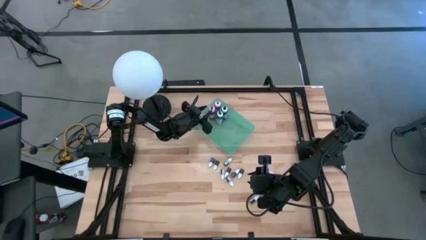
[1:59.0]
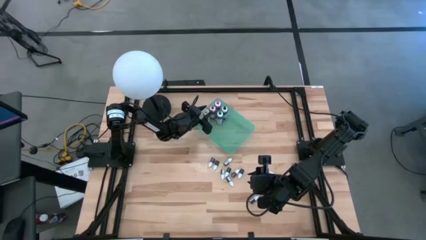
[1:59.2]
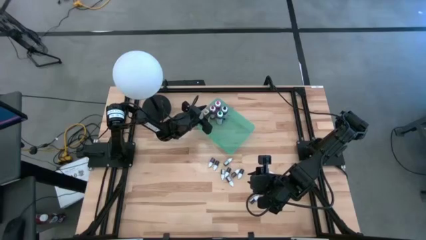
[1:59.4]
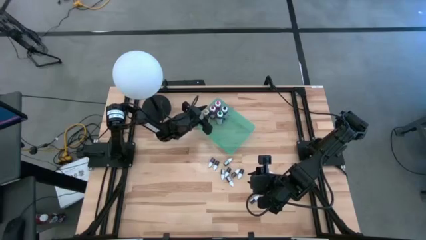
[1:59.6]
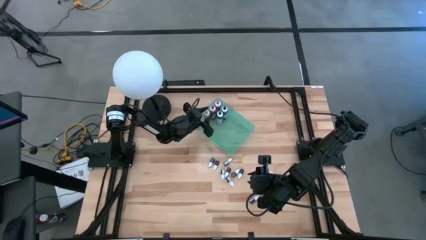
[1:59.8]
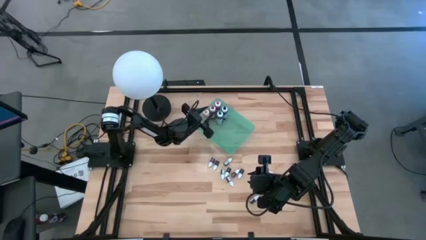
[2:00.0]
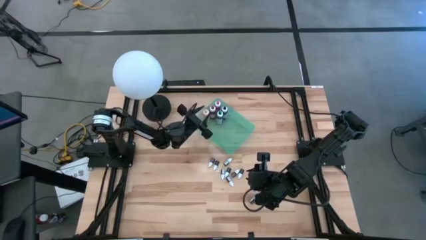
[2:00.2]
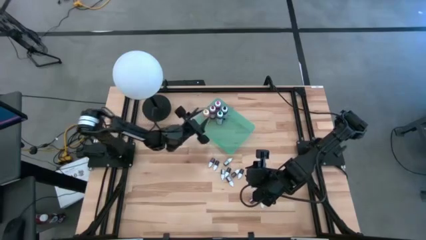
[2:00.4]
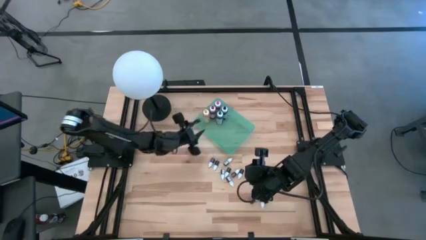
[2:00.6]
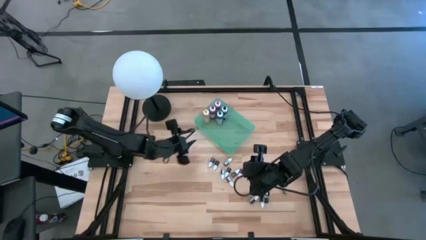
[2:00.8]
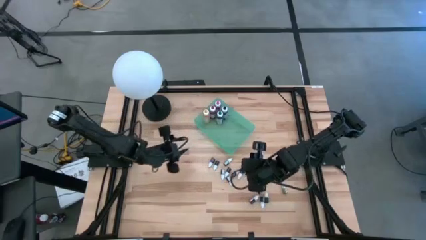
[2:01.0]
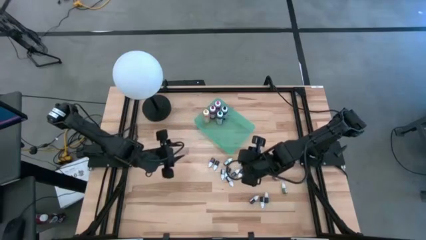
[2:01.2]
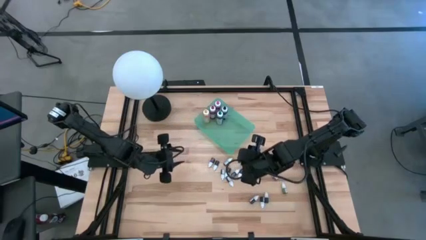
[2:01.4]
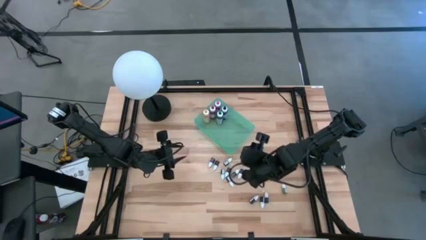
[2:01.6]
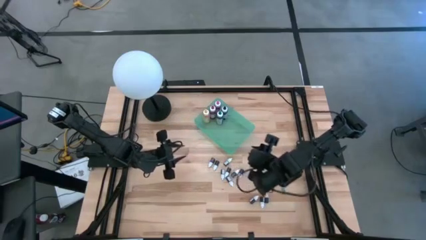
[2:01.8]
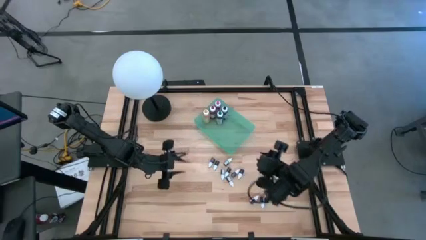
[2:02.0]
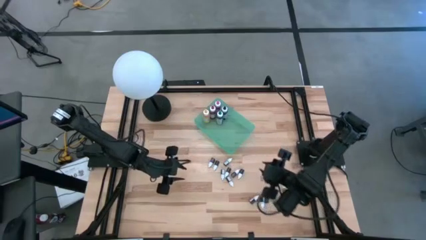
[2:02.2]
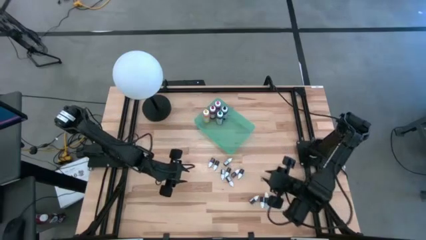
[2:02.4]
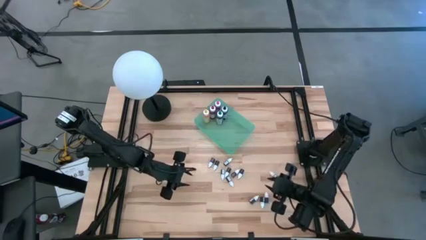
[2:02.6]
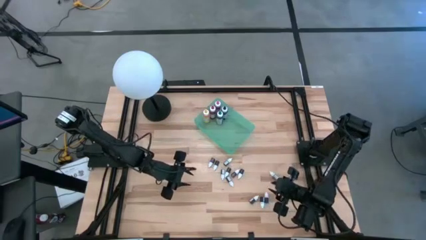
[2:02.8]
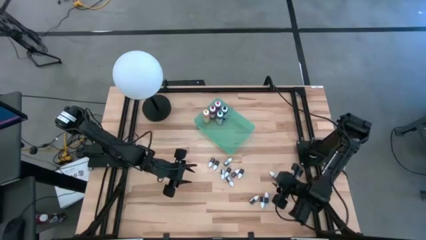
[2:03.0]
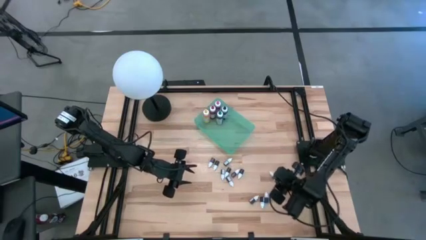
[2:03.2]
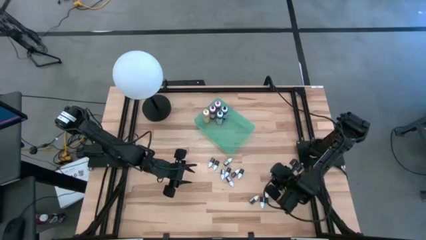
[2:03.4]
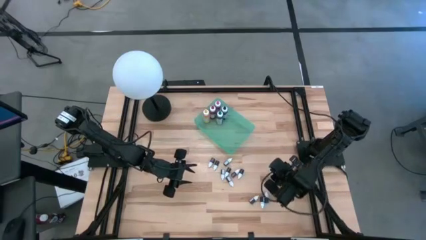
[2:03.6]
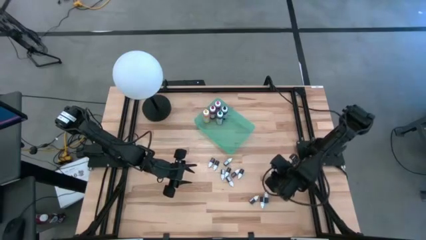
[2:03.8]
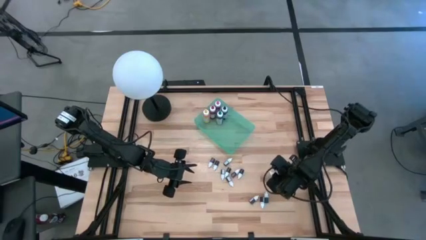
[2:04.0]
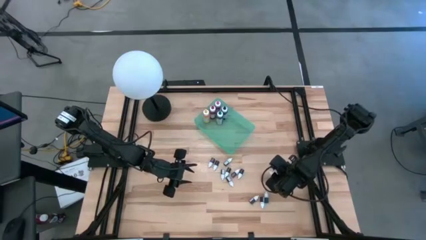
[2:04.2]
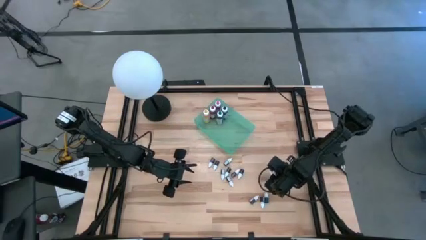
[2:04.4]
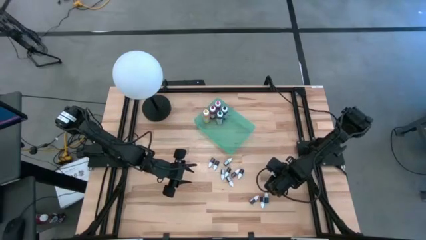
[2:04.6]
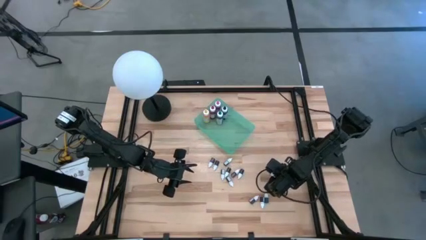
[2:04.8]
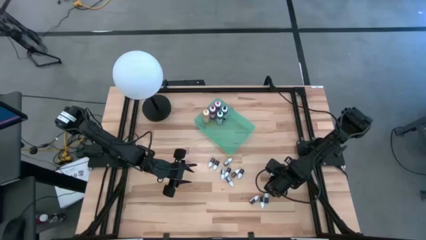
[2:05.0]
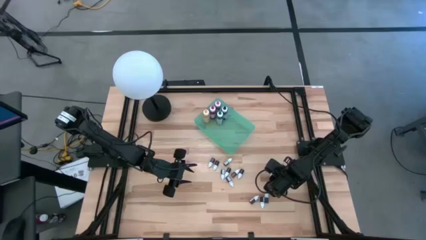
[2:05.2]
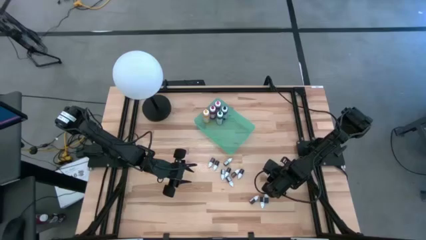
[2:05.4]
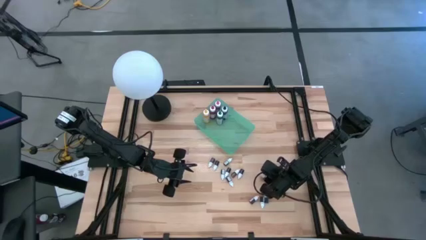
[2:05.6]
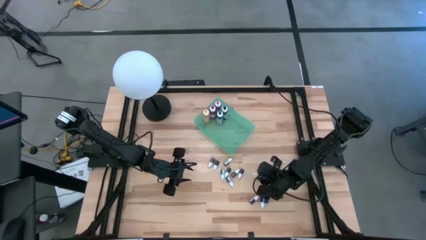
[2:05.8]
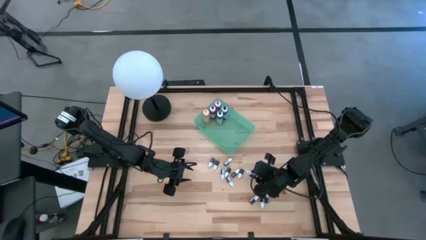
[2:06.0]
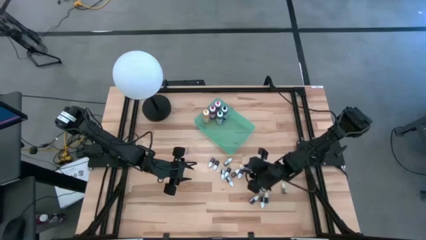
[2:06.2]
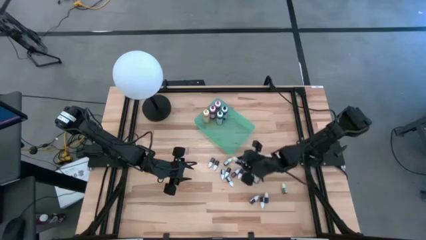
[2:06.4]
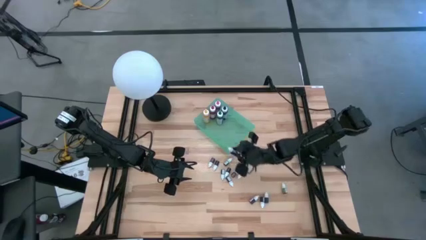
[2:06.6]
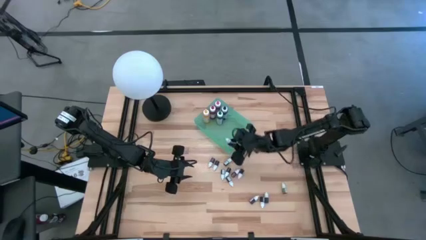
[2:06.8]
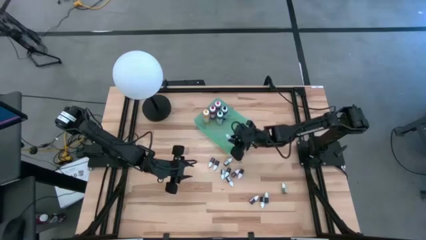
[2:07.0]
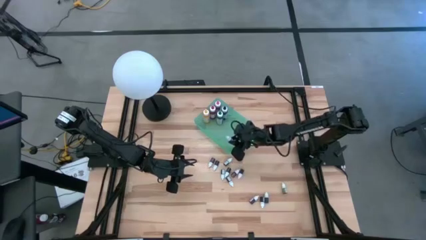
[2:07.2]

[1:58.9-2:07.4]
Task: Pick & Place food coloring
Put the small purple food coloring bottle into the green bin

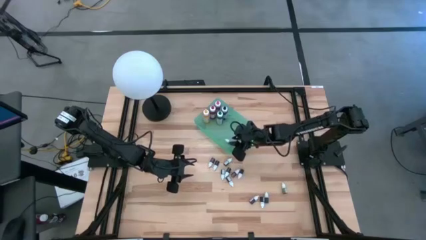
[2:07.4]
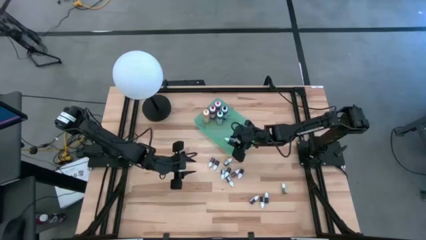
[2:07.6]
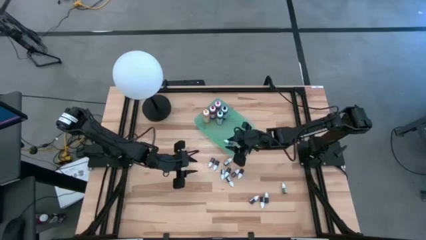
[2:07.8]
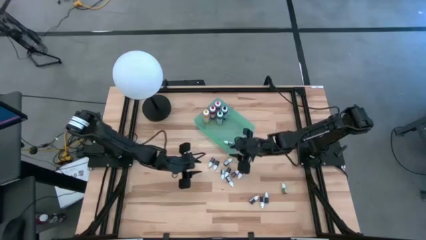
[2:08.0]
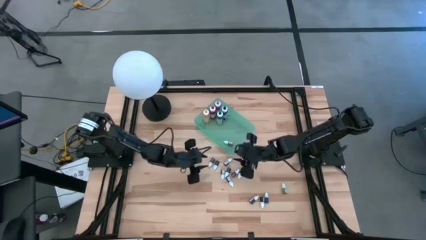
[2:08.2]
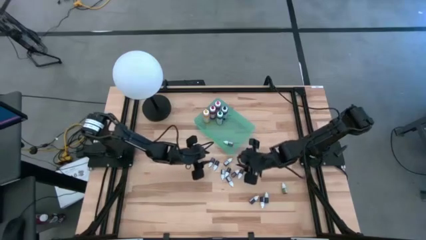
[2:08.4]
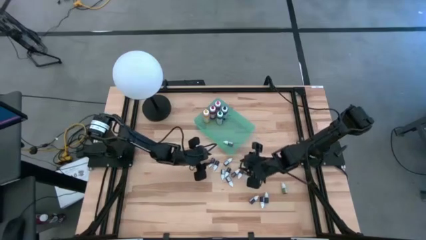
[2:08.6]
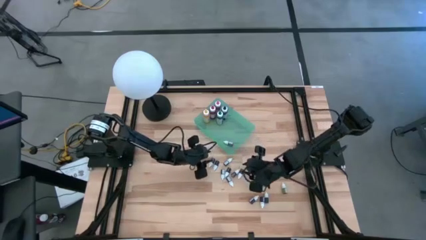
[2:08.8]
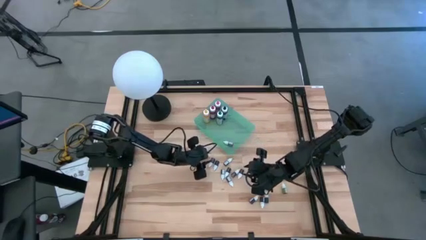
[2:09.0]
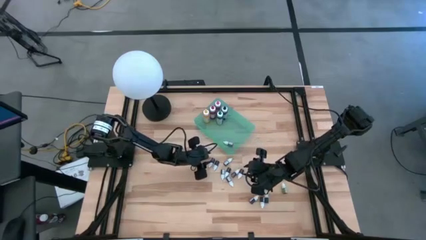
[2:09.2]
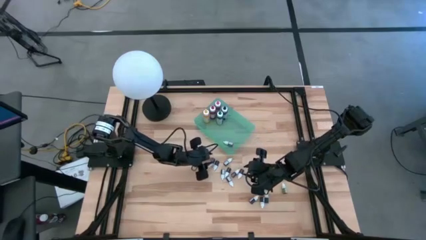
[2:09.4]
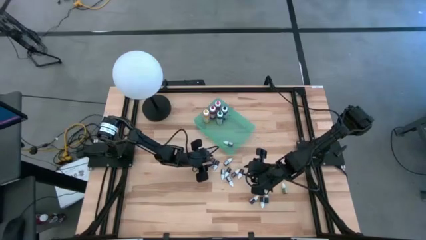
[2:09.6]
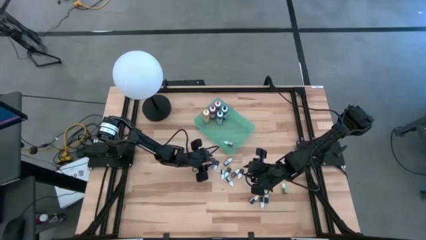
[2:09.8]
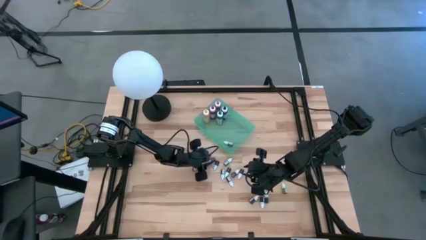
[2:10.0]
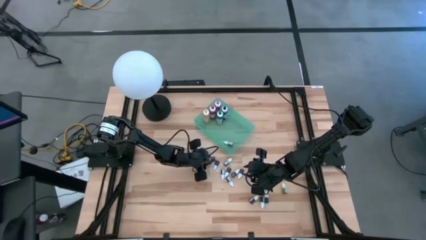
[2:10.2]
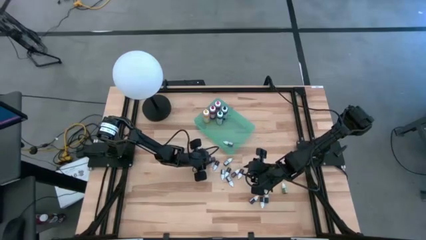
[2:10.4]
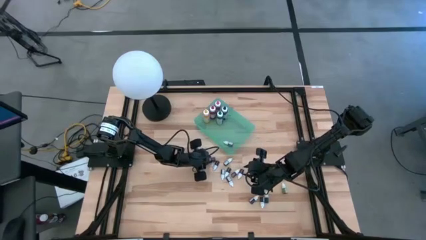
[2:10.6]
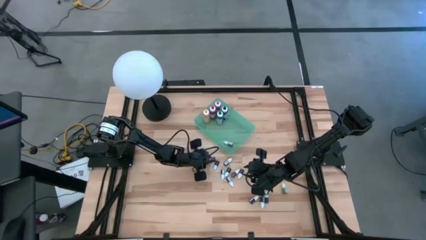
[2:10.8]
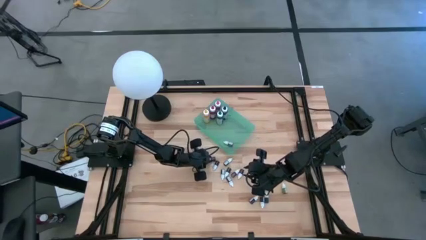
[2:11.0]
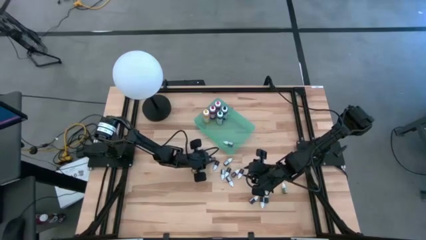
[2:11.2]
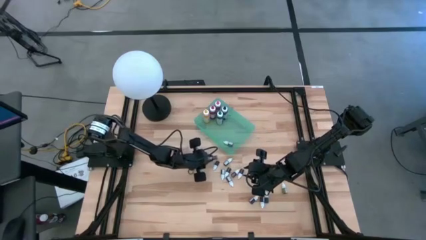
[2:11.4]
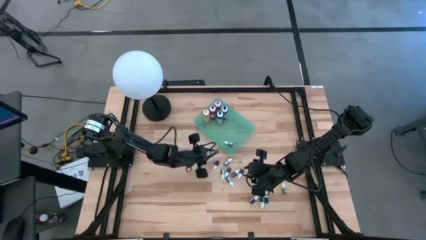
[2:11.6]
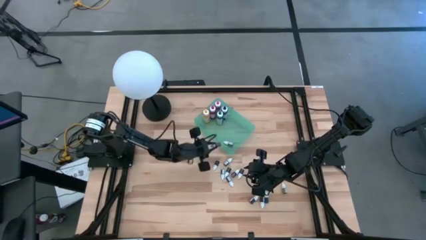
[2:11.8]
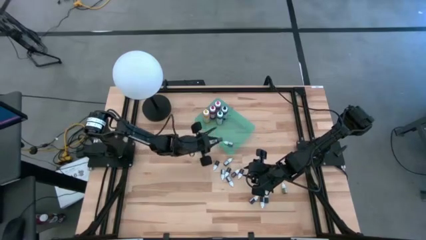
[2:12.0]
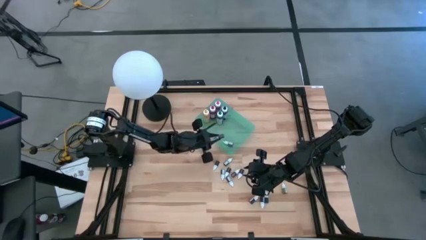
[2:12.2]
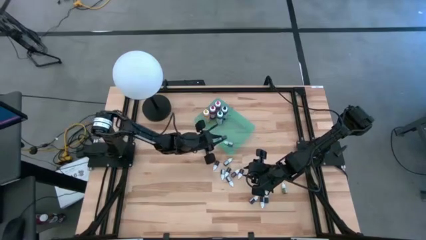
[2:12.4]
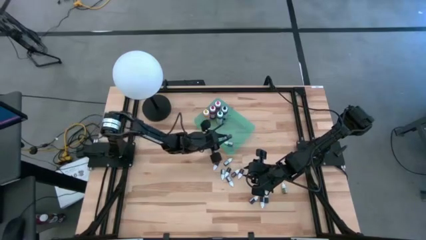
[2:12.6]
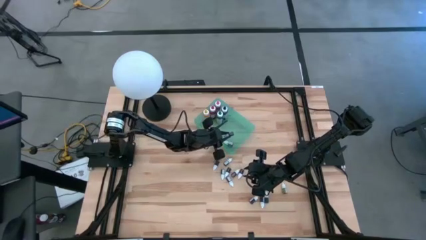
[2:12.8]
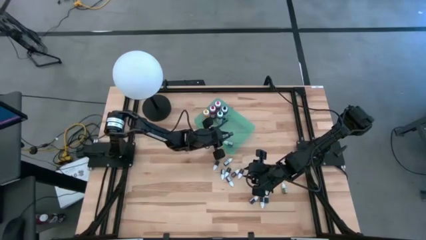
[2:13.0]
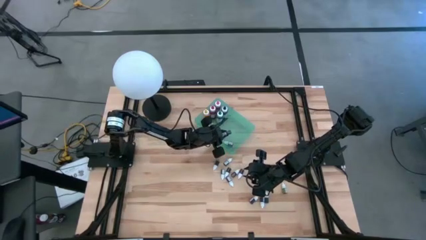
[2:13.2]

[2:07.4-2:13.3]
Put the small purple food coloring bottle into the green bin
